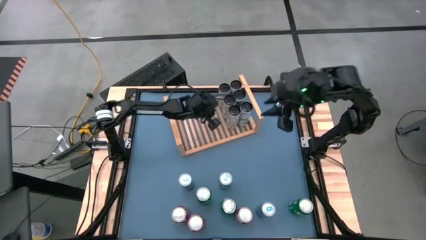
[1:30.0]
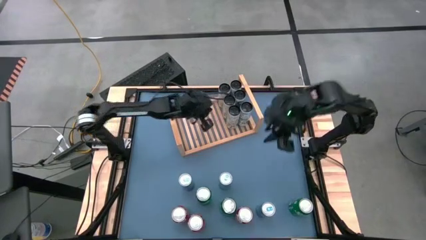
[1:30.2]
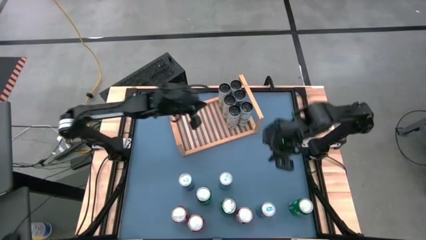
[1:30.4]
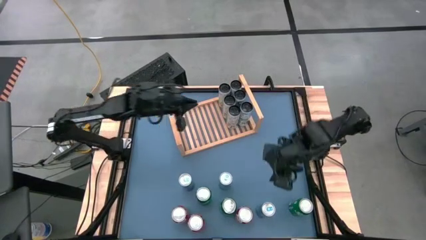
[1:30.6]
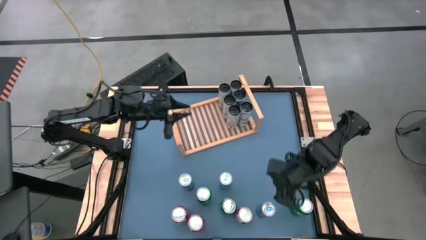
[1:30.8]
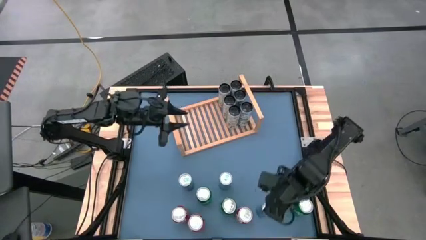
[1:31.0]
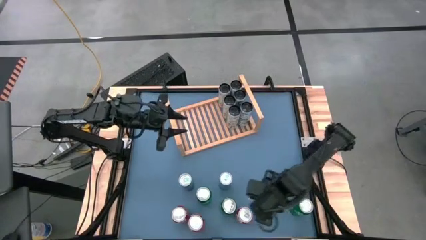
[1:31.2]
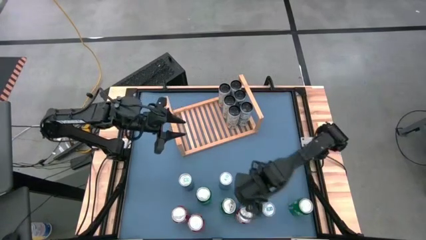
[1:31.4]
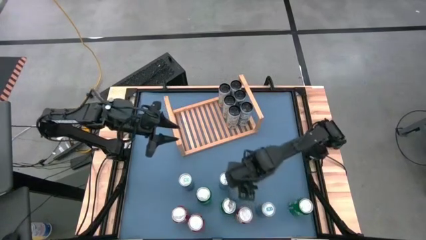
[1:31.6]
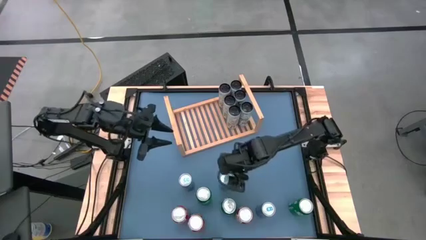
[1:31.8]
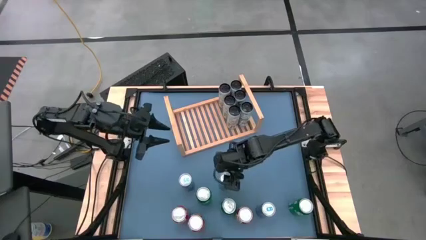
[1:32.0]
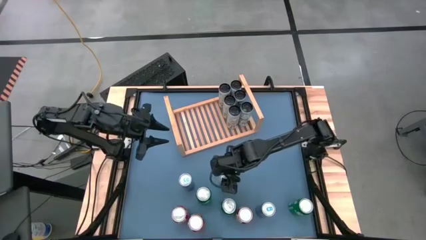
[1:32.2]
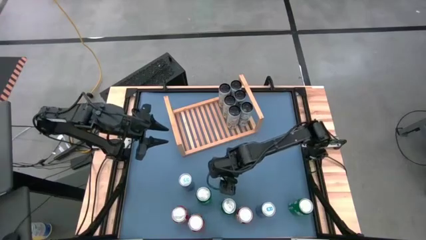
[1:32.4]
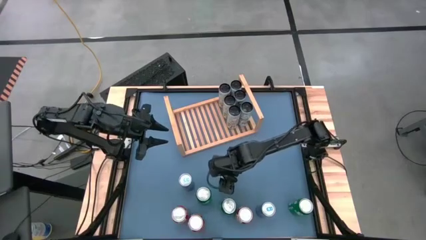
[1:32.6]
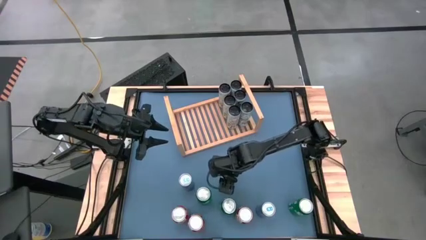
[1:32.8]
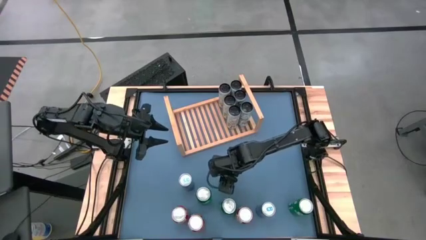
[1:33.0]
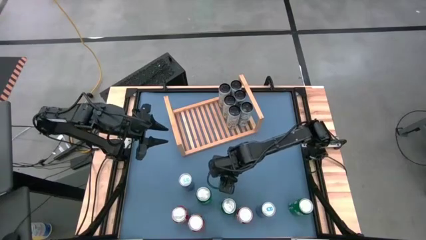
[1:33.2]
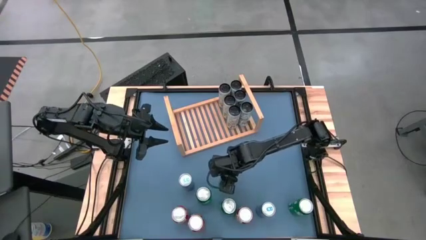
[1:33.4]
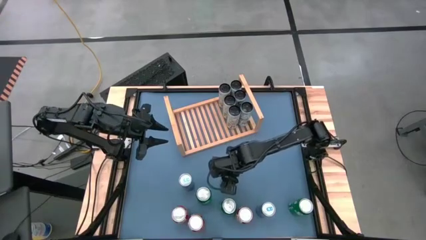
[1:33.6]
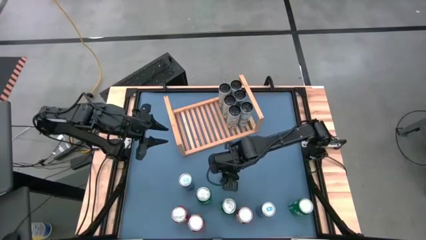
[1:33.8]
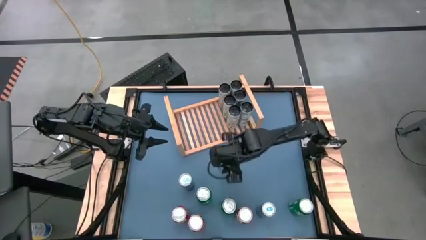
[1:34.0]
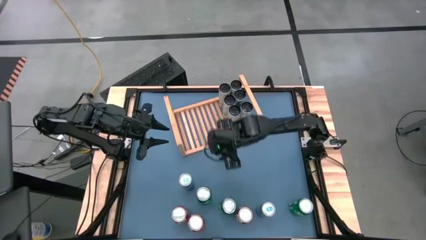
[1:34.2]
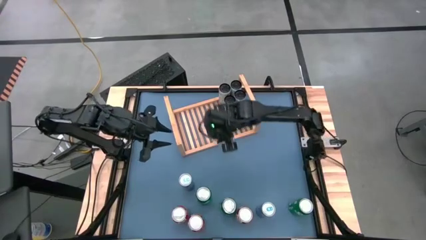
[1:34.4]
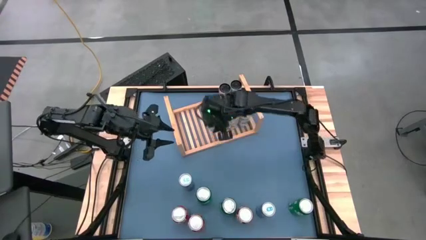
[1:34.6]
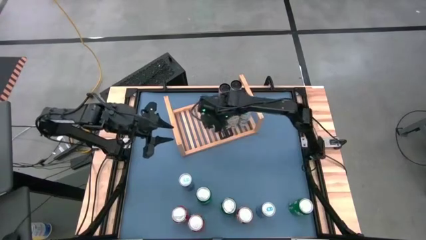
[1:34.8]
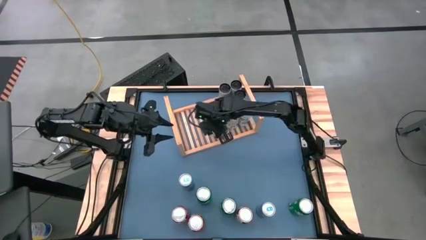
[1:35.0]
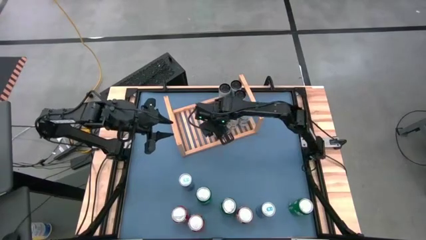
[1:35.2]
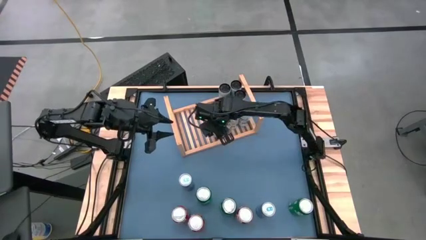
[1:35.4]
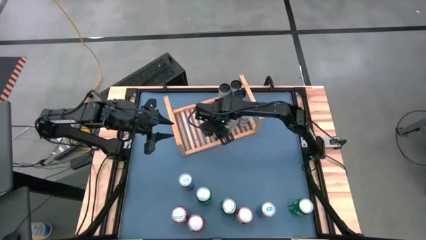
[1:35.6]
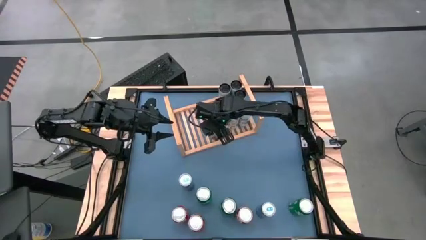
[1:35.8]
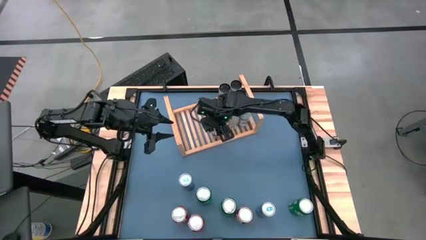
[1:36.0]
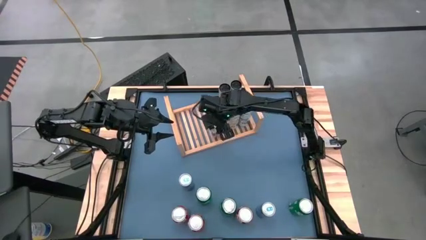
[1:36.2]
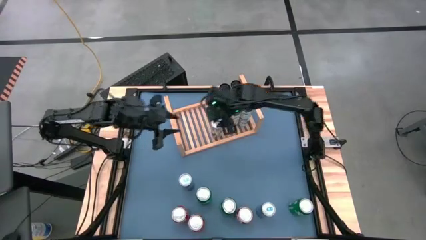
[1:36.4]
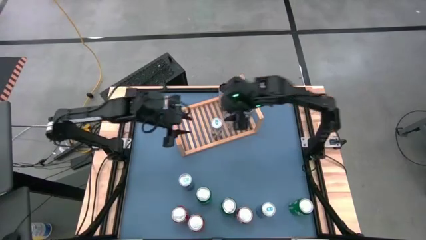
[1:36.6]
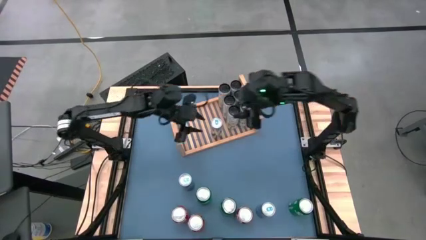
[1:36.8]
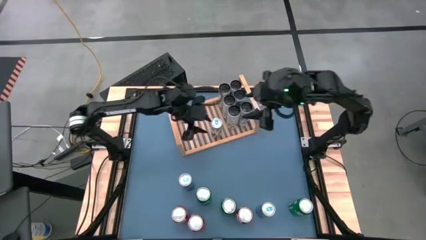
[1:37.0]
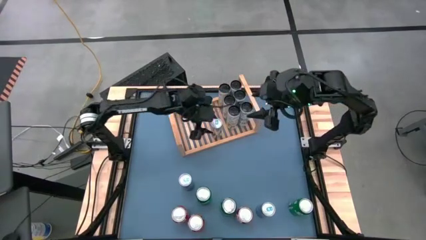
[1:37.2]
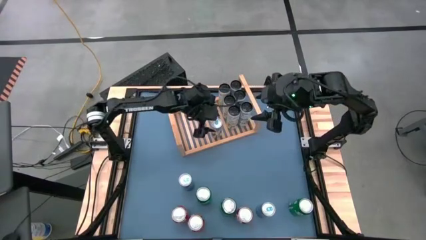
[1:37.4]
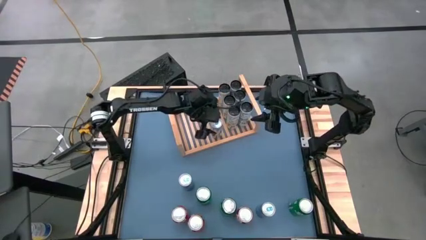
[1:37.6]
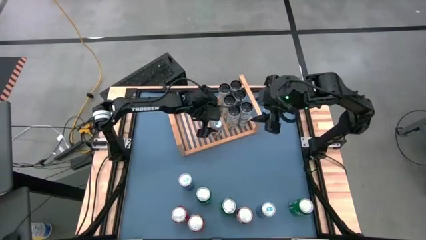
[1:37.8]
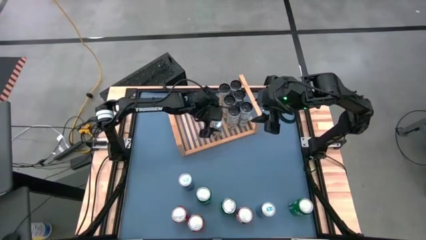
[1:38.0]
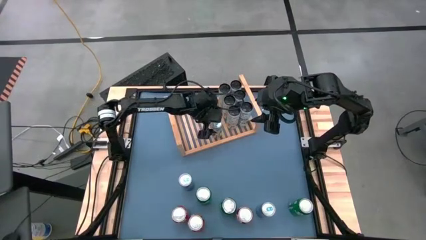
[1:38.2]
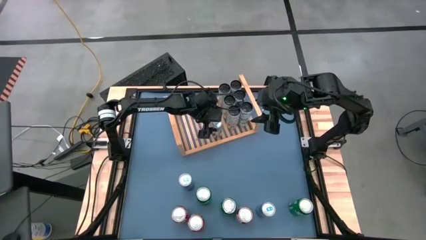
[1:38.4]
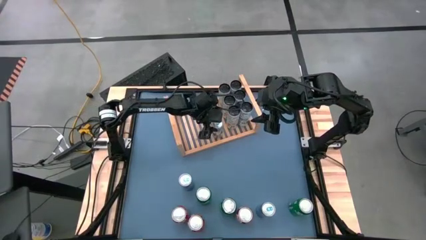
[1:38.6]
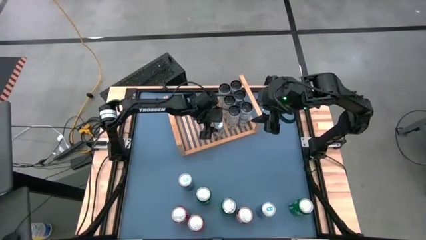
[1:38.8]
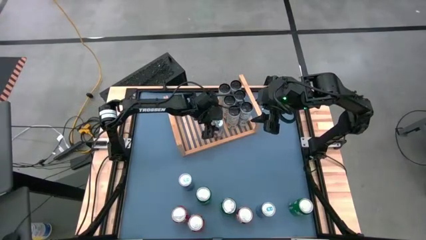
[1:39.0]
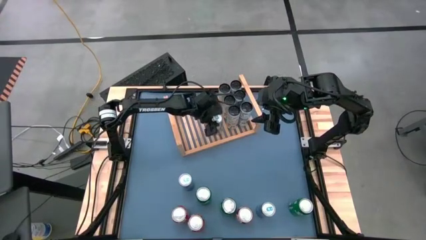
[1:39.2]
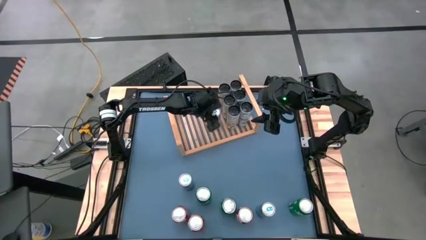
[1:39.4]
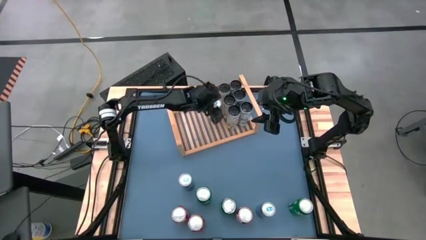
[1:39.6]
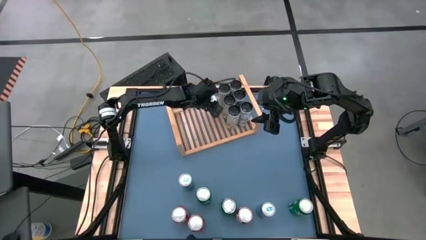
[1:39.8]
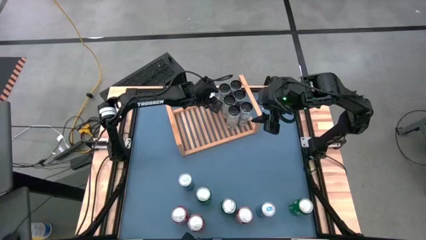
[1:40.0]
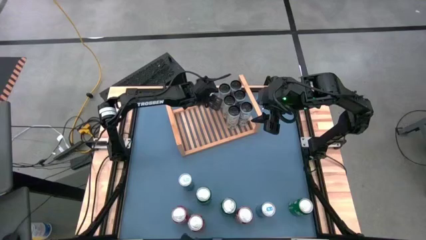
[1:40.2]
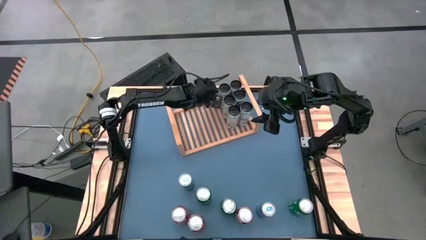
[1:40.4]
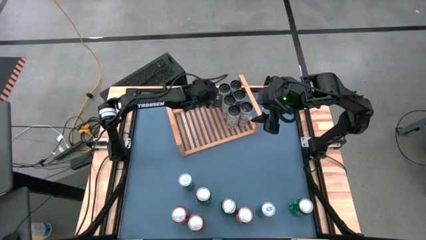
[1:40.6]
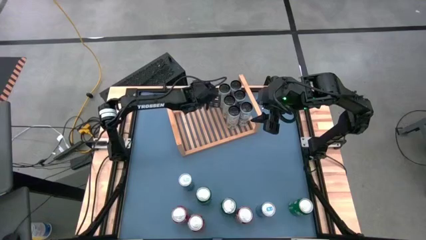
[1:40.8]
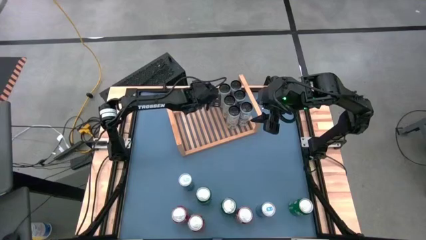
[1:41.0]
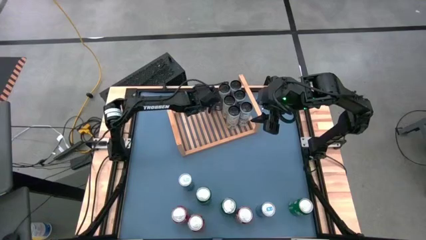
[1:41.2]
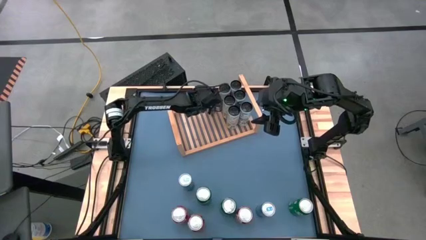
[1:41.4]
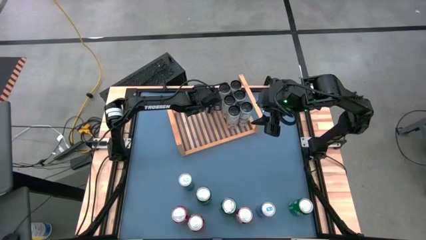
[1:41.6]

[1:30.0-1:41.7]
Task: Place canned beverage on shelf
Put the blue soda can on the shelf
